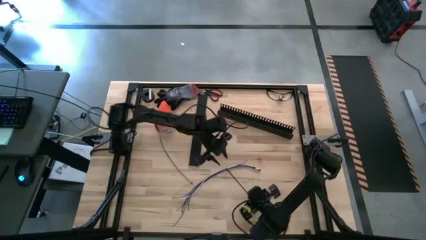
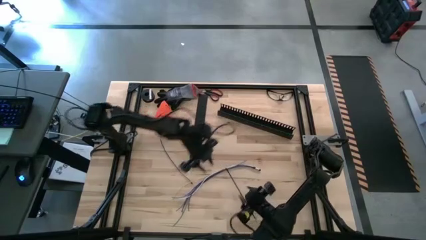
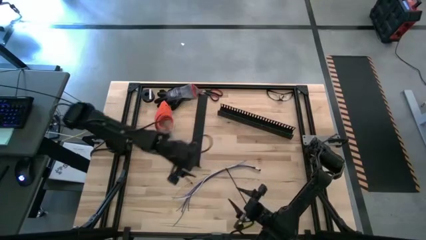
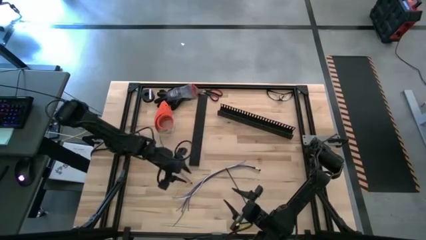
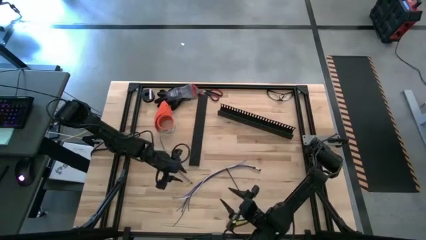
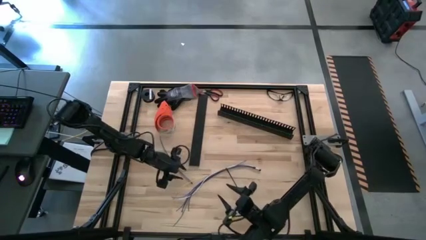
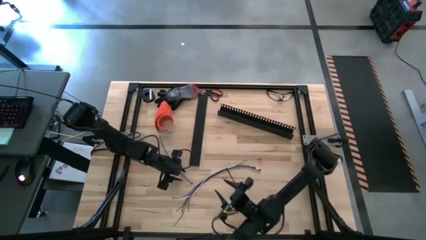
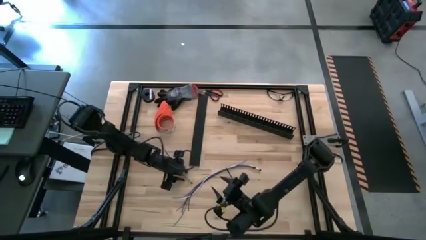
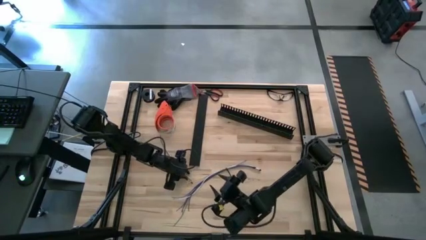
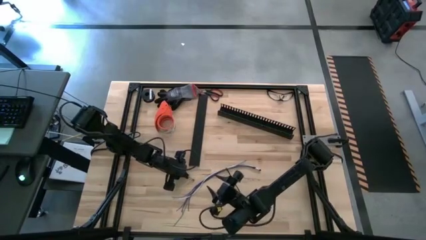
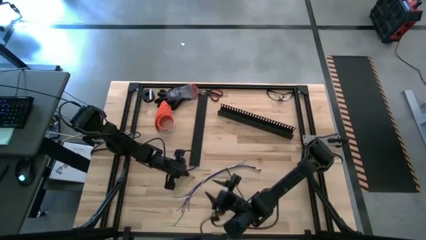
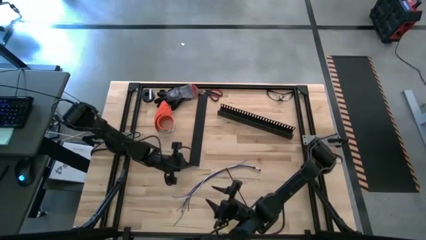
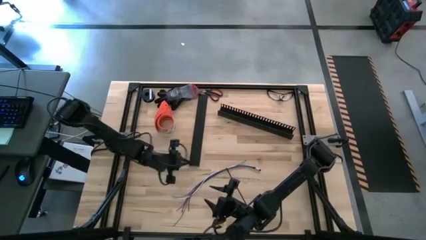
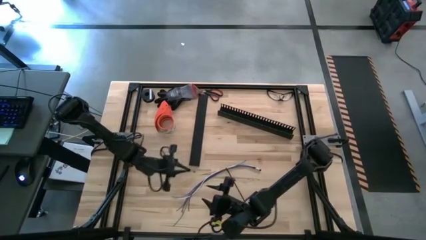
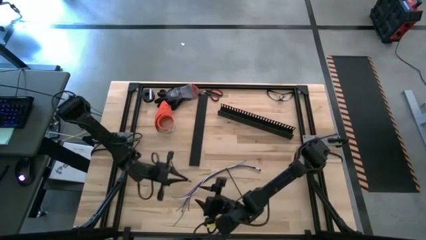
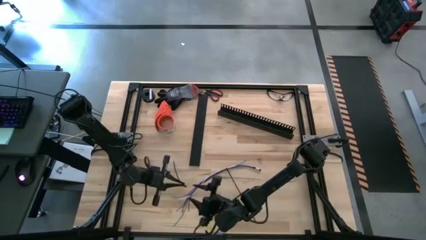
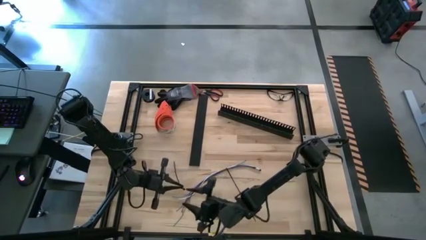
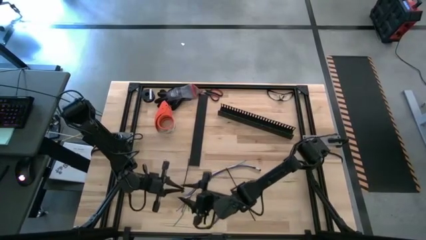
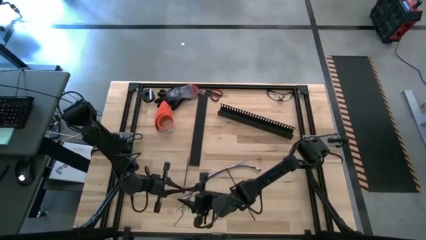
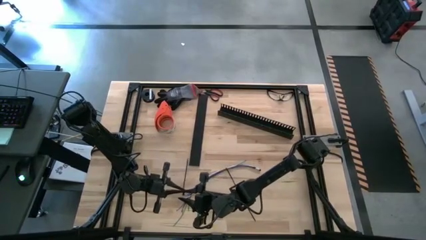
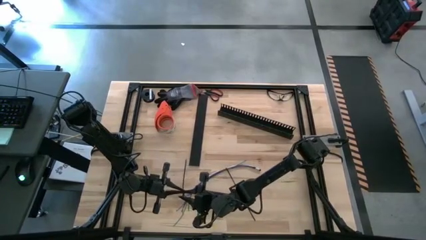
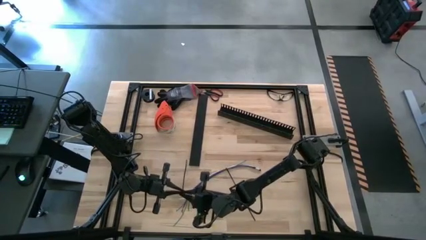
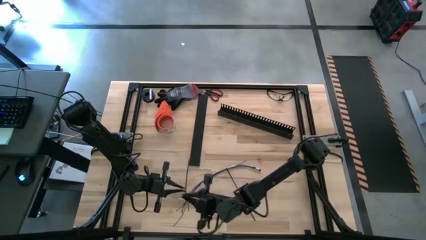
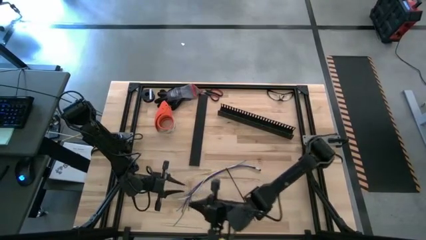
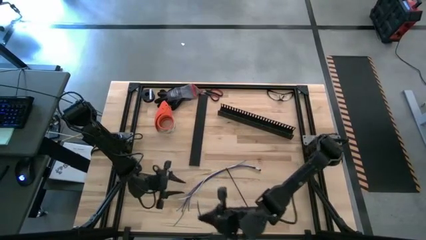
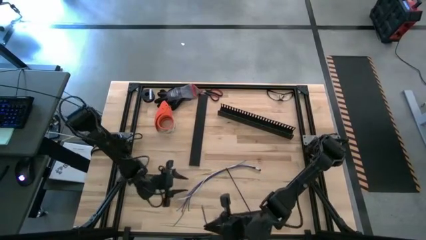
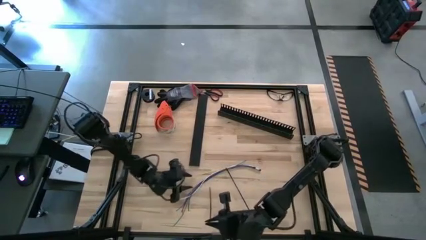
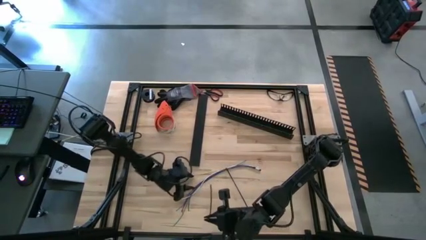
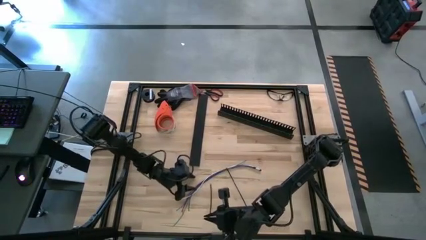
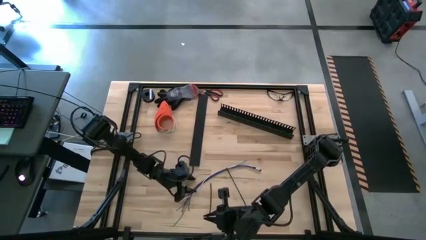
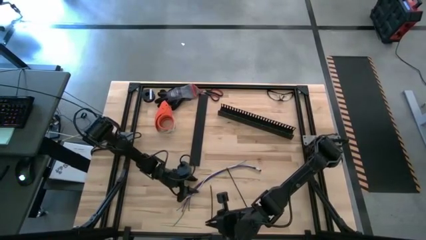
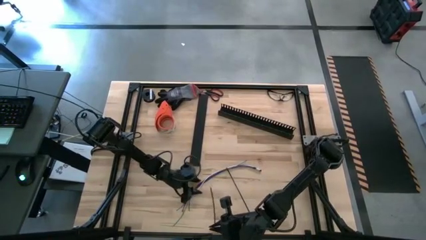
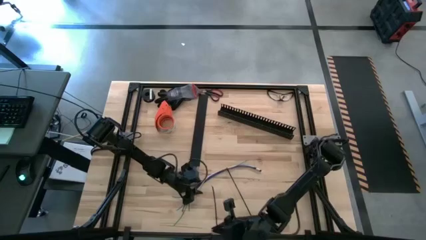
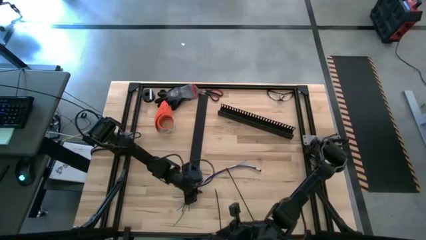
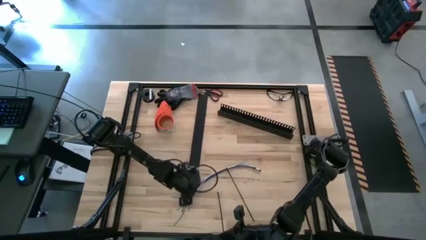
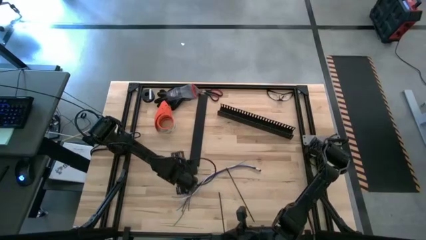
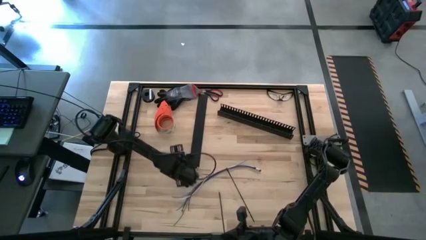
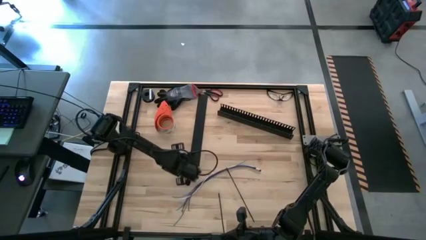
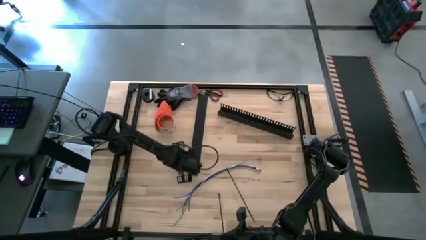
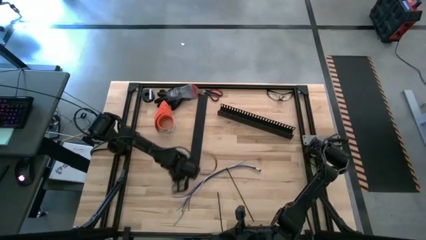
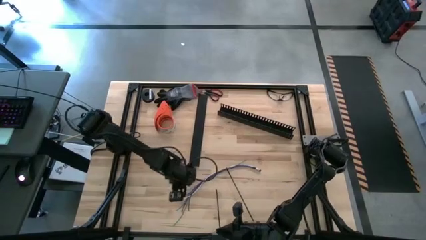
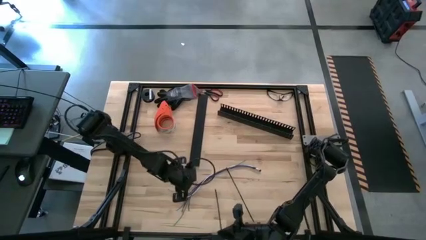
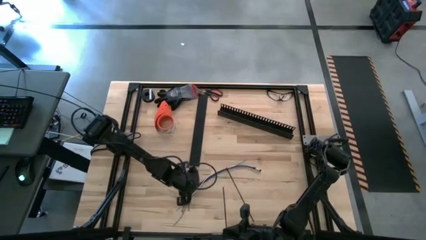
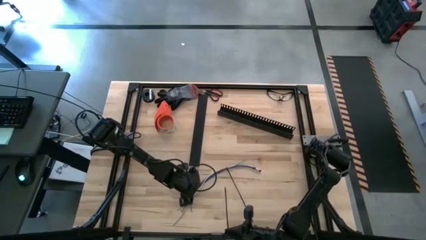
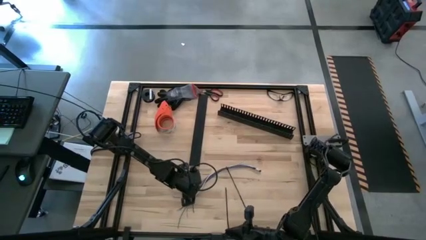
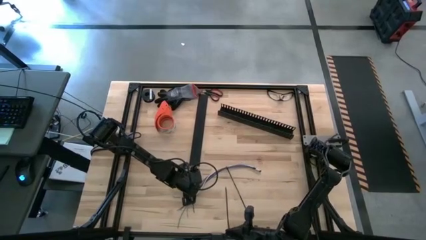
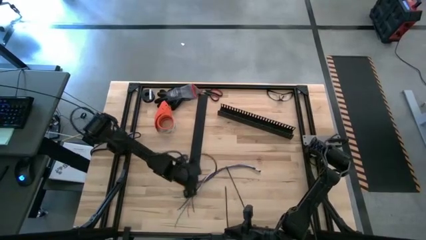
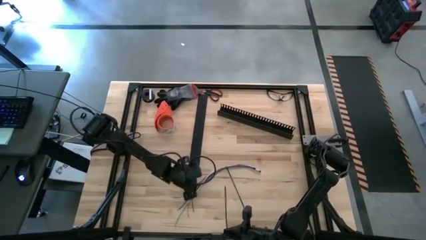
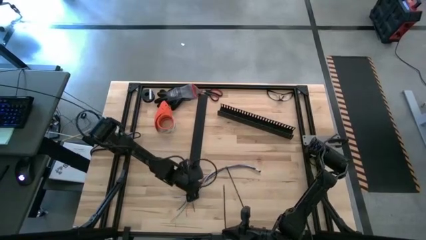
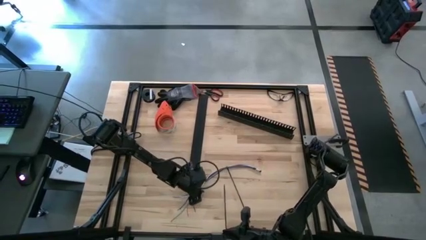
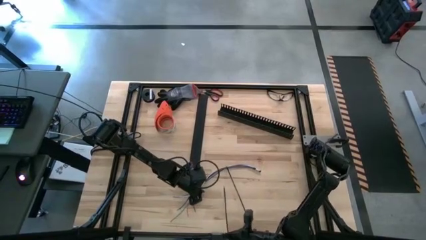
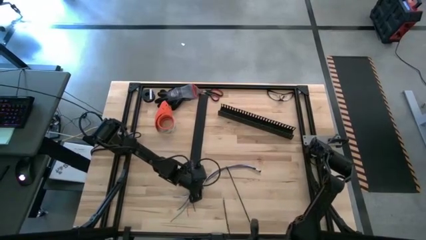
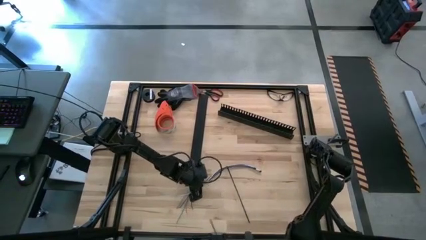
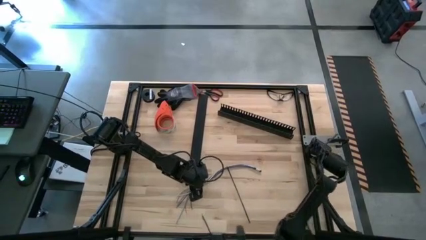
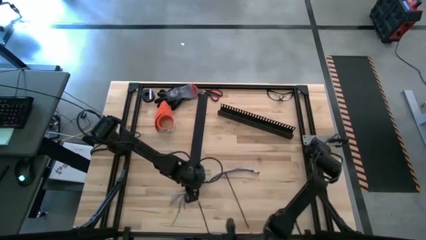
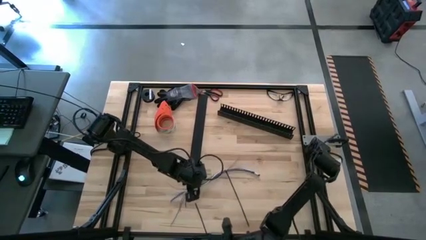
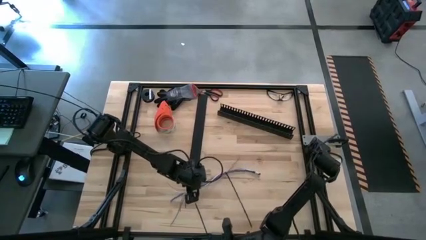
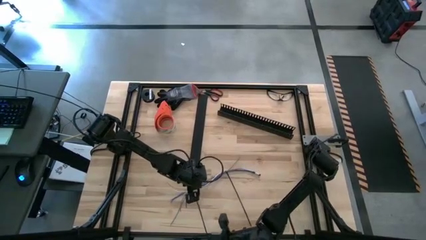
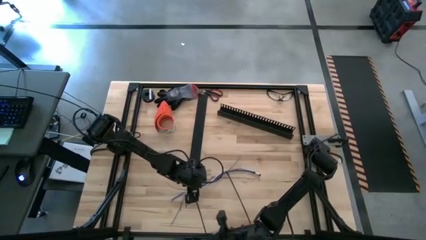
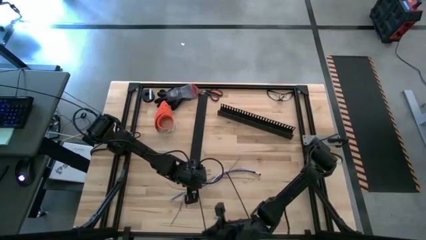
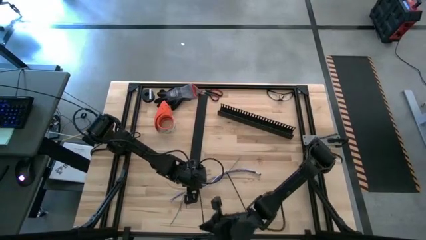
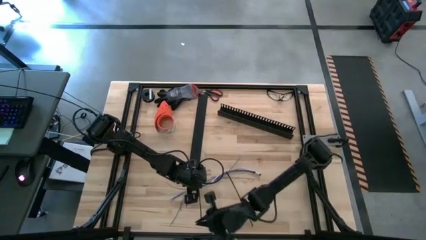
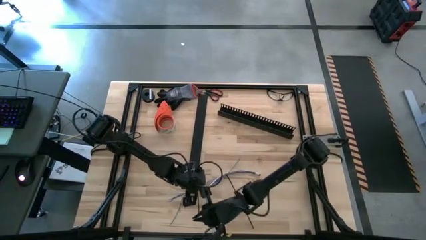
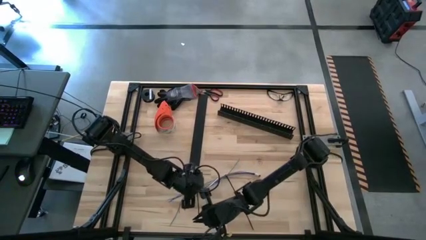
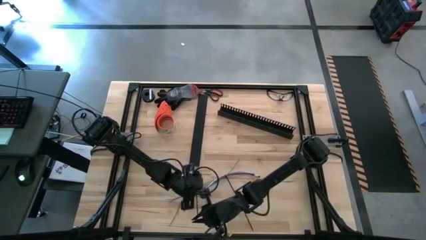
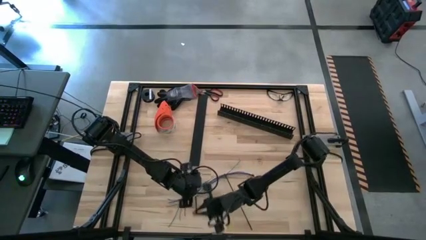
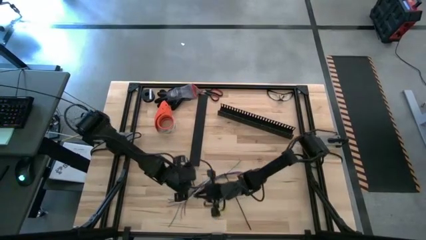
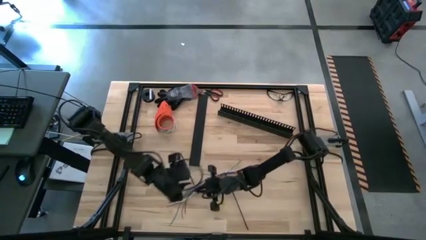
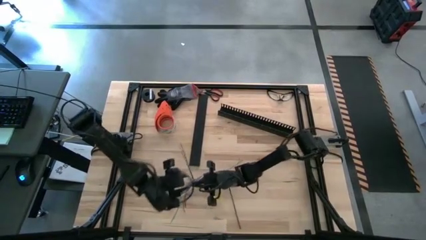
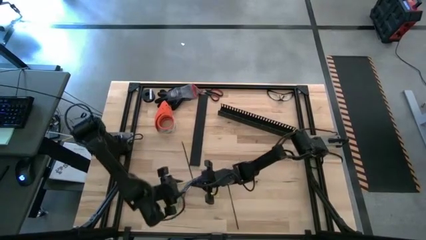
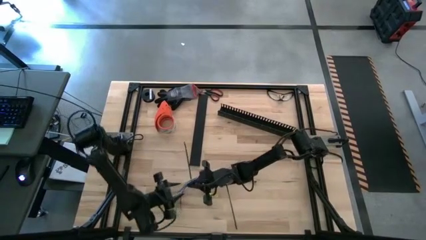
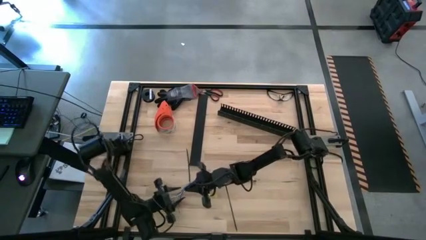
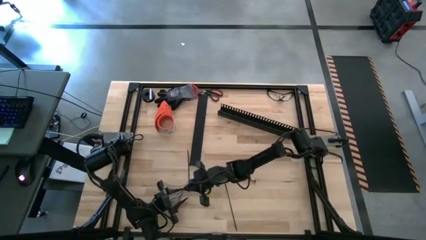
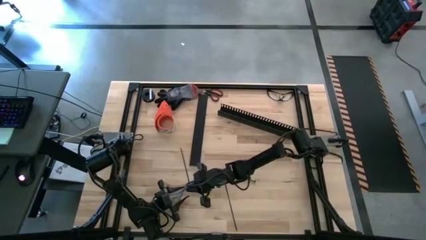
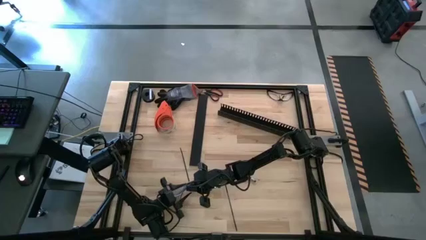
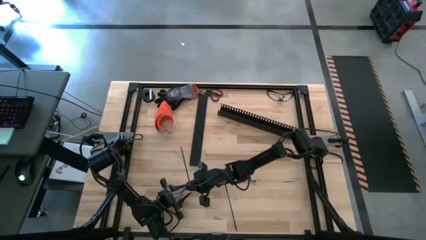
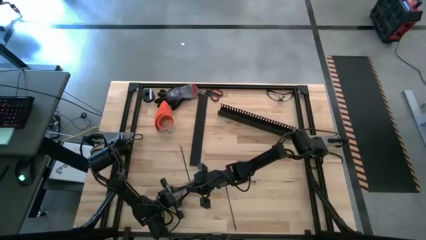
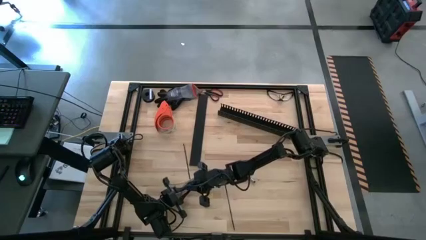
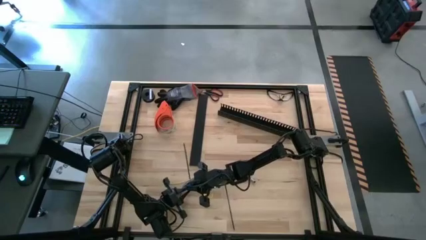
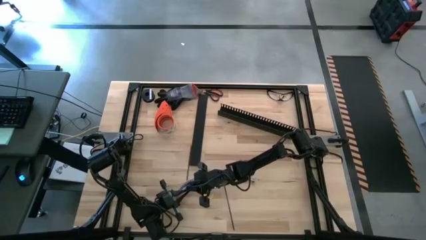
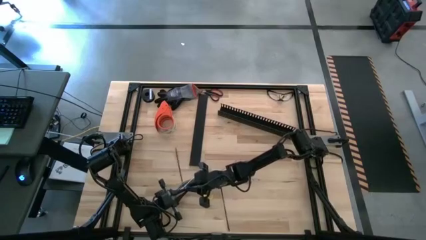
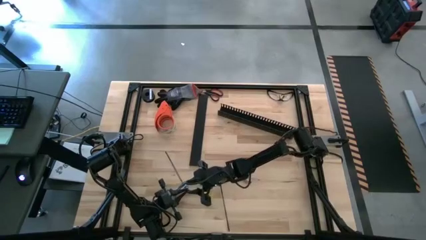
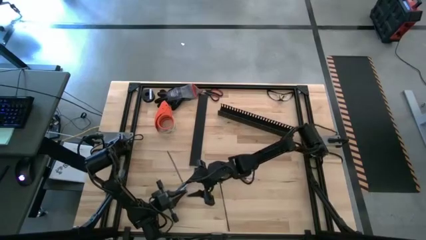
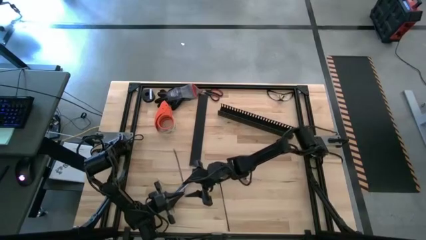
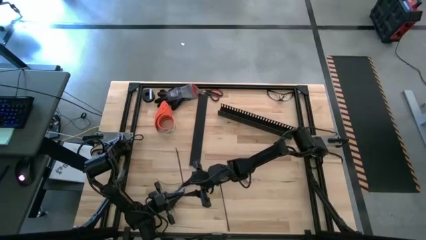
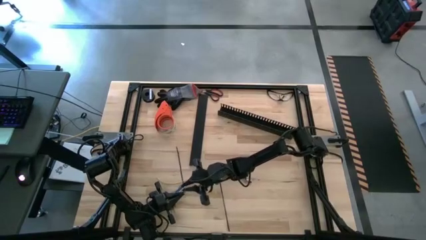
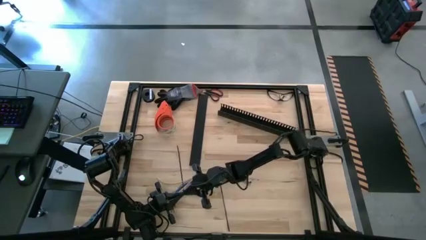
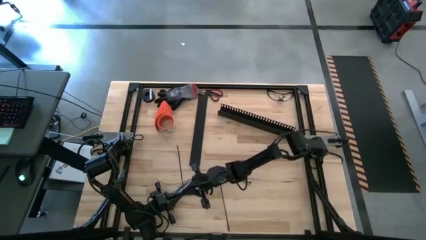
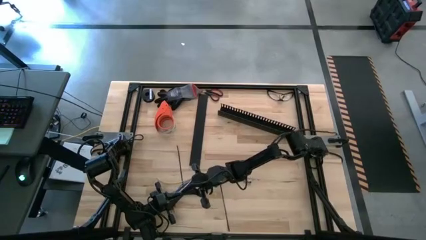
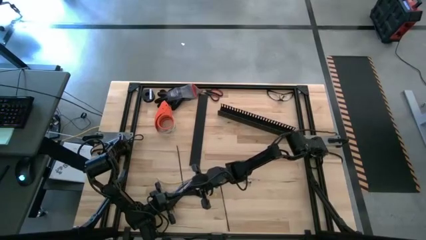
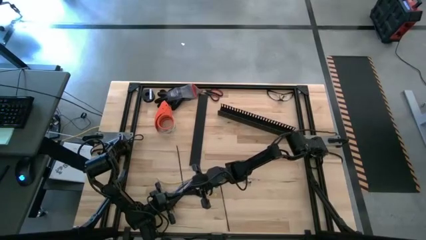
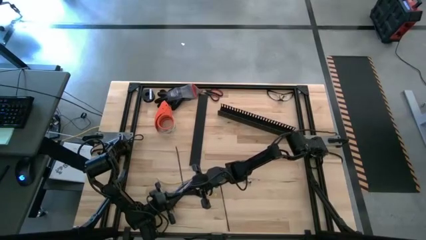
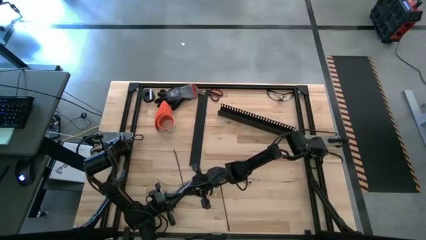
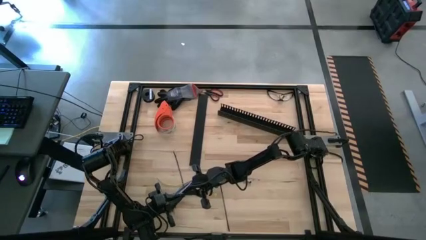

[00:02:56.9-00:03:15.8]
Task: Ziptie cables
Wrap the black zip tie on the cables
